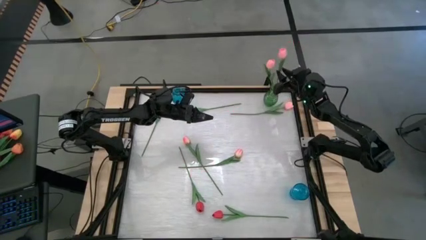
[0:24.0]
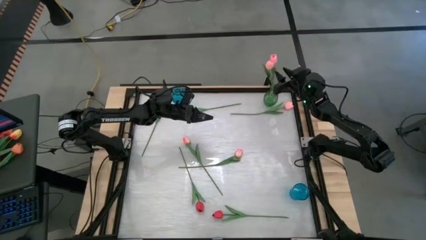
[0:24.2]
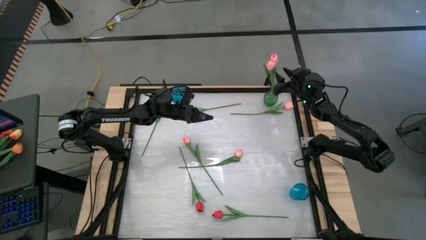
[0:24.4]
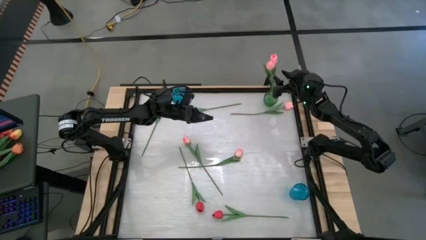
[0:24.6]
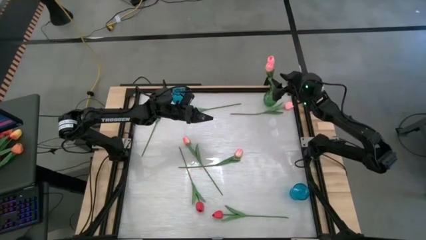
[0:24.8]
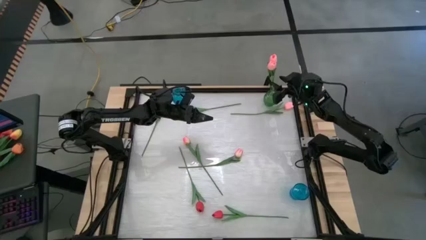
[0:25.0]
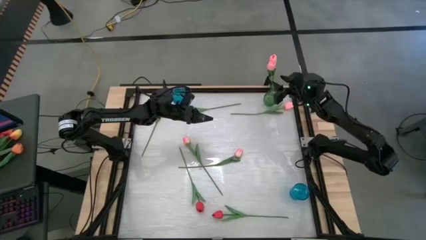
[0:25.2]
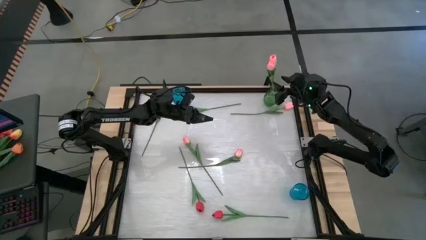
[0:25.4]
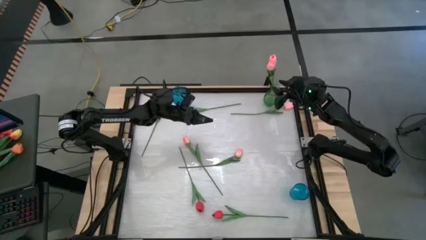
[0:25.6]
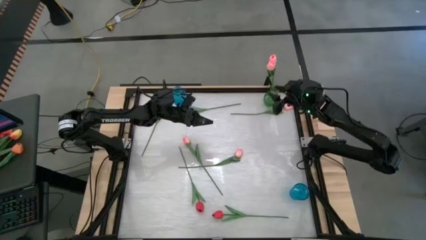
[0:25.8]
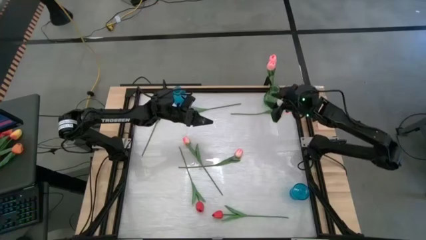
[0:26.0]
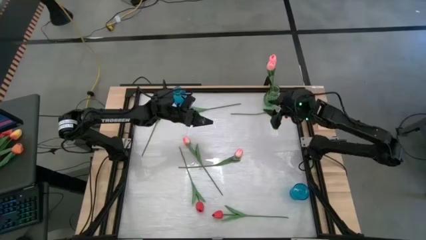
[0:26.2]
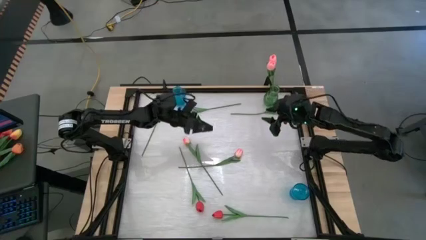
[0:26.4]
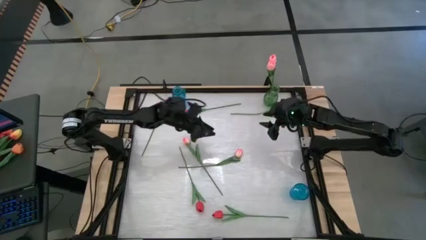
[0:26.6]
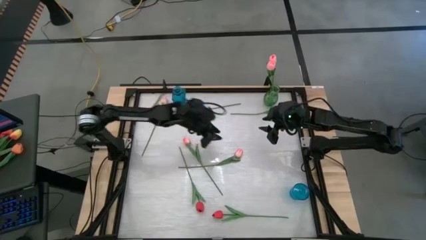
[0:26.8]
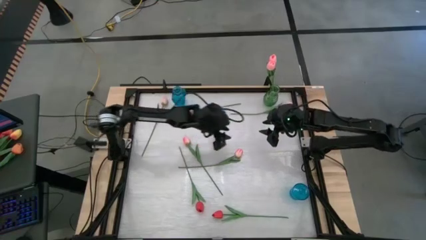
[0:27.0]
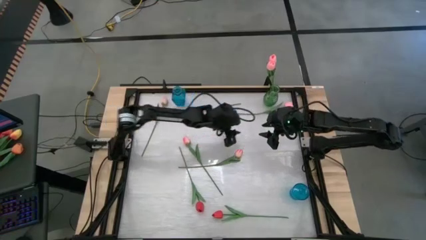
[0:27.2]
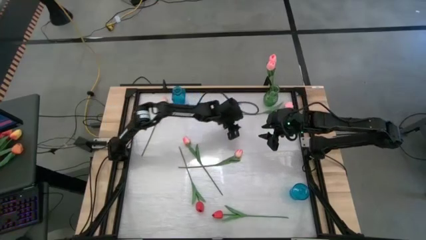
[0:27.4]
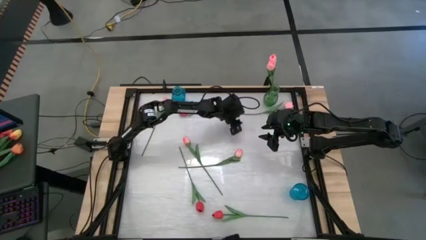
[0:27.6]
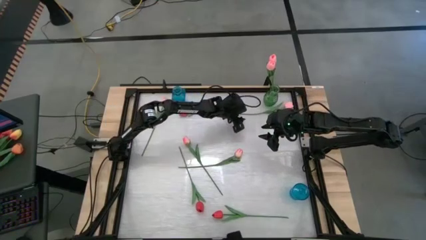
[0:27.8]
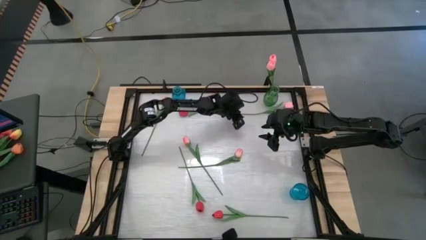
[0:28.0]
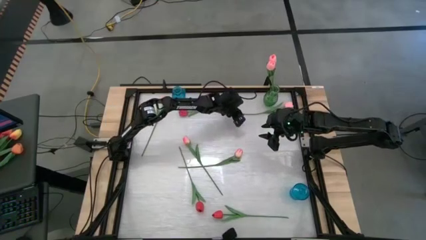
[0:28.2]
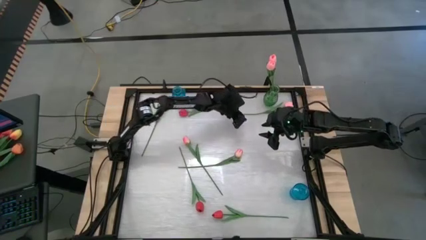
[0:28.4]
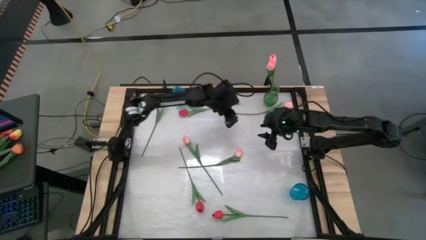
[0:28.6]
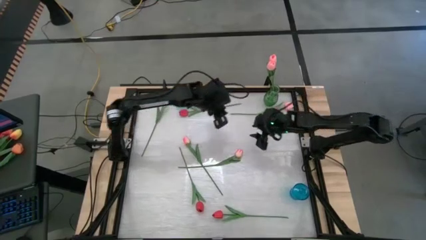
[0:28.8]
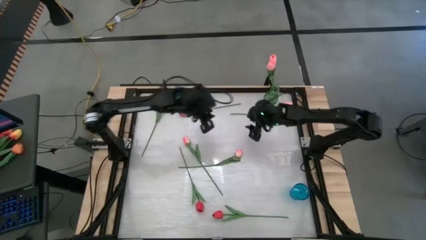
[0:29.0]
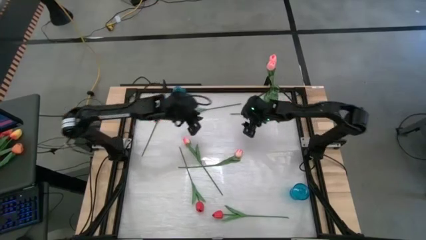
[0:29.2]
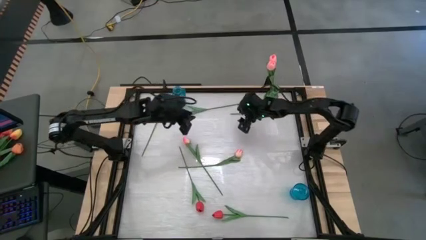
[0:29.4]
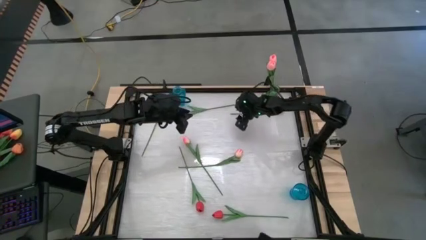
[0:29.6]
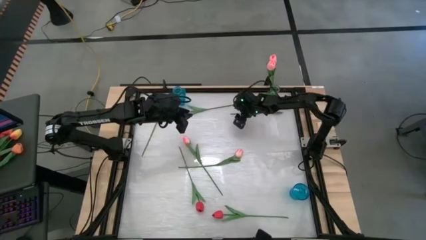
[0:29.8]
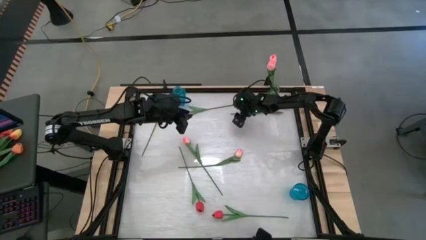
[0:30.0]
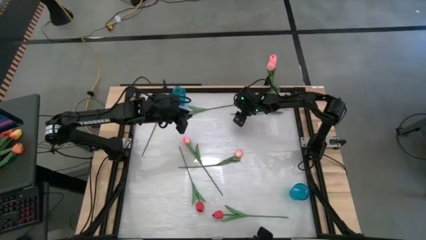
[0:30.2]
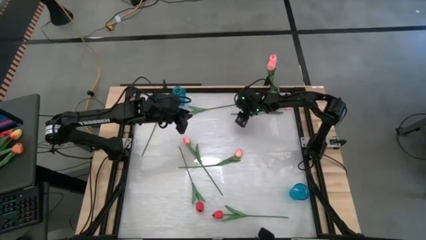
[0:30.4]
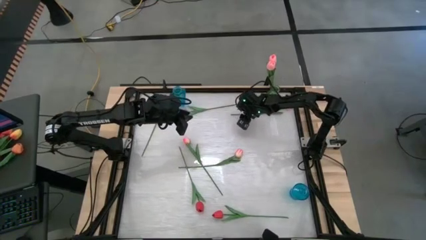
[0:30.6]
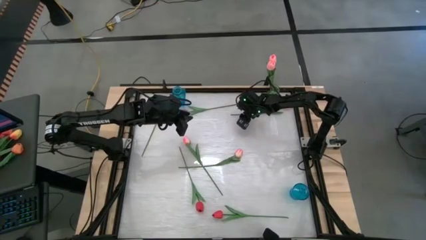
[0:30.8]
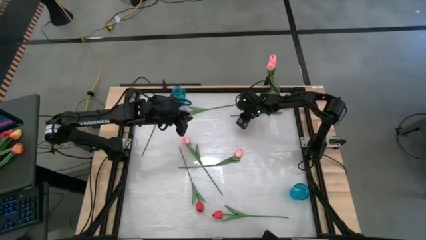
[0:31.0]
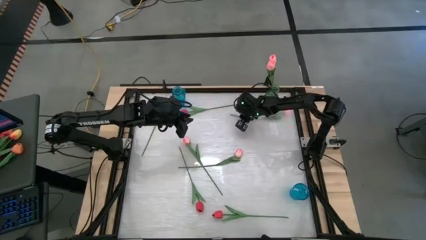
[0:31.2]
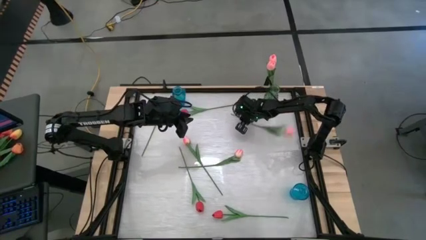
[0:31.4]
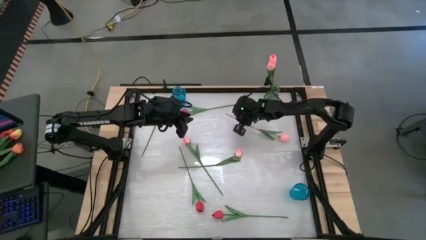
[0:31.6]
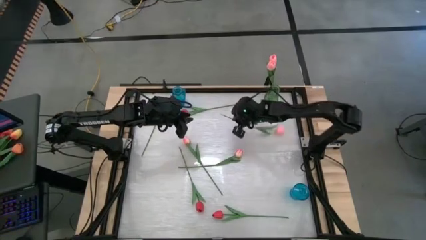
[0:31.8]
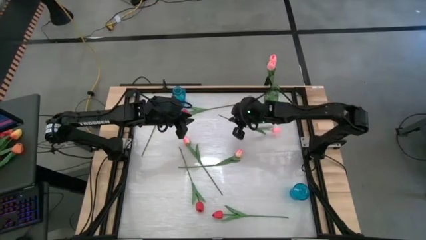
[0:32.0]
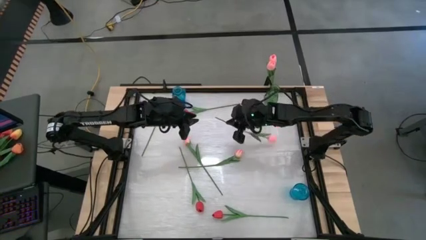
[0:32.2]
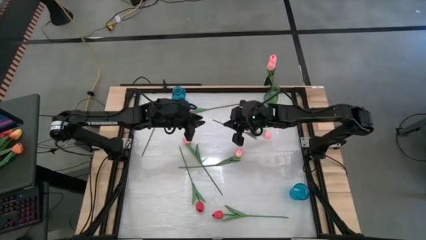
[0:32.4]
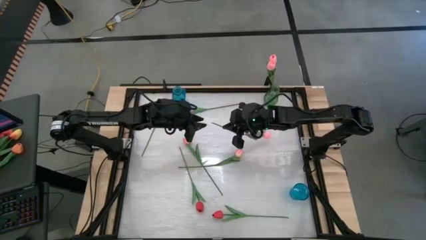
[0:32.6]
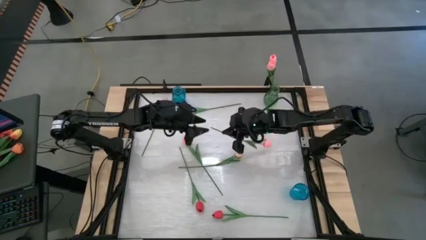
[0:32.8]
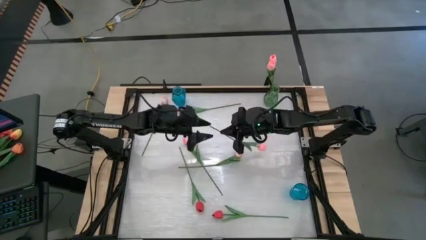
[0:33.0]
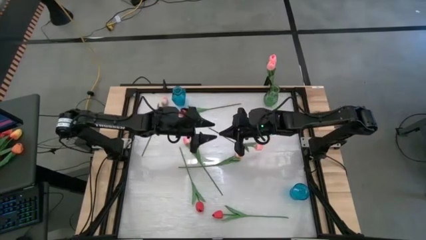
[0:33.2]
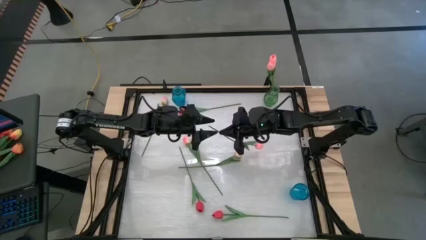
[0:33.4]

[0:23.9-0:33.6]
Task: Sort flowers into vase by color
Put the pink flower into the green vase

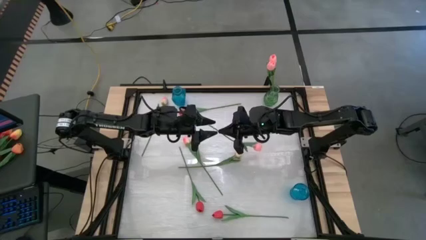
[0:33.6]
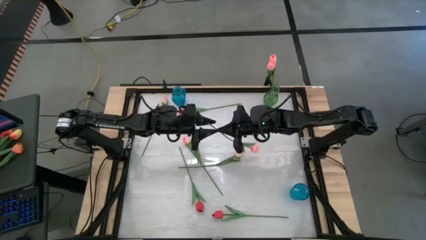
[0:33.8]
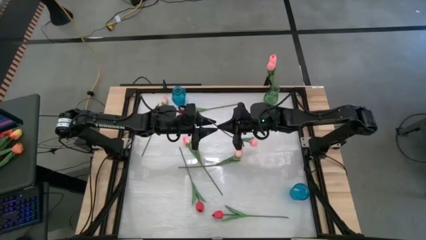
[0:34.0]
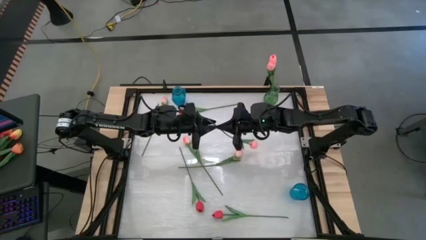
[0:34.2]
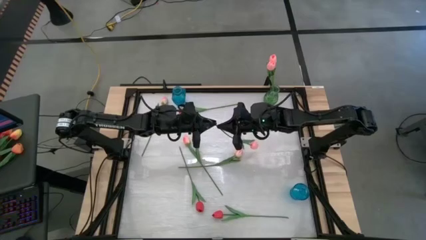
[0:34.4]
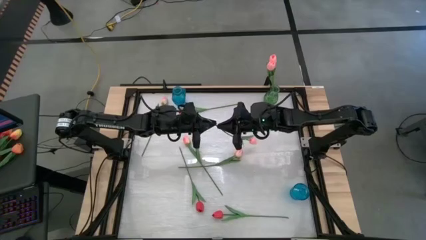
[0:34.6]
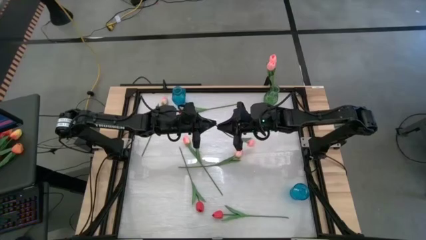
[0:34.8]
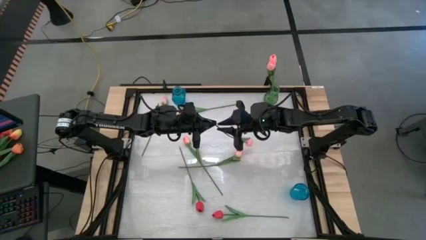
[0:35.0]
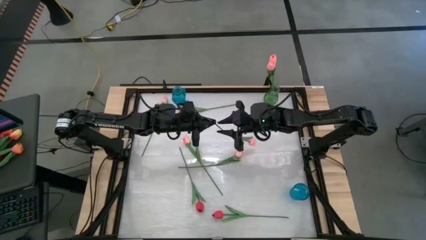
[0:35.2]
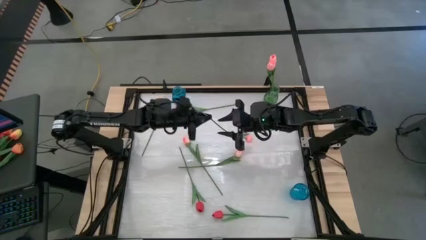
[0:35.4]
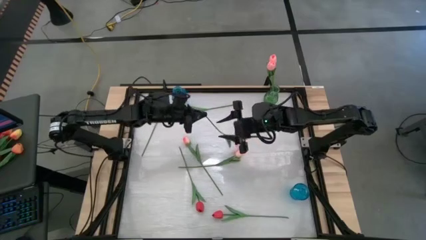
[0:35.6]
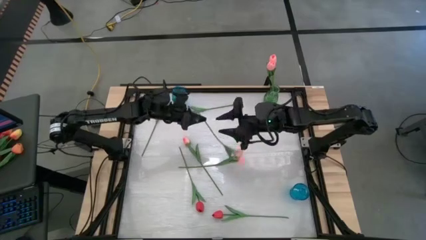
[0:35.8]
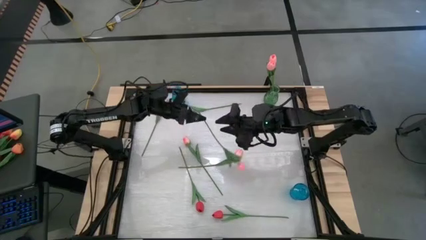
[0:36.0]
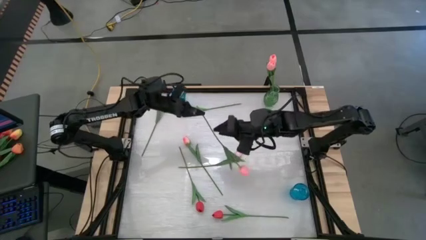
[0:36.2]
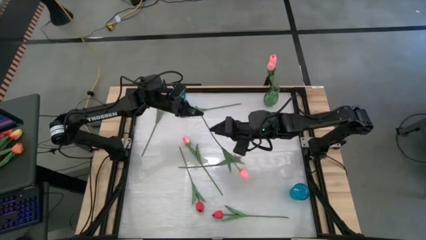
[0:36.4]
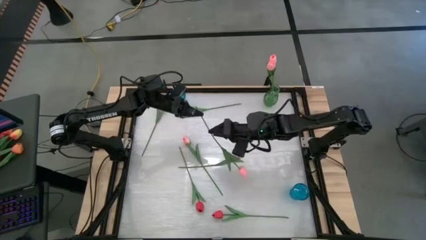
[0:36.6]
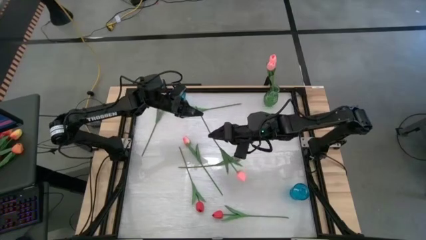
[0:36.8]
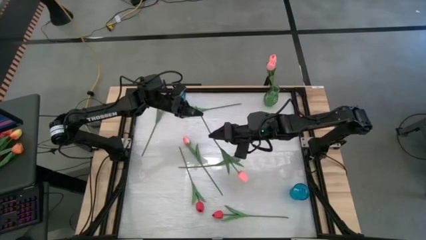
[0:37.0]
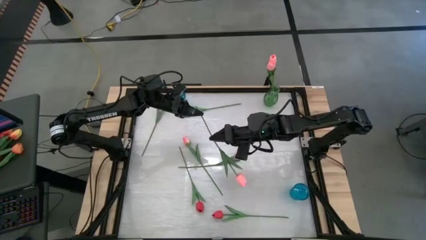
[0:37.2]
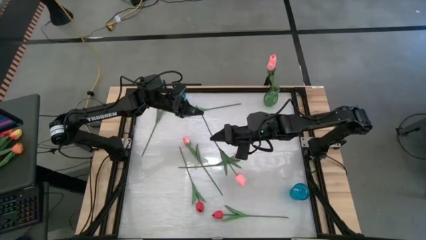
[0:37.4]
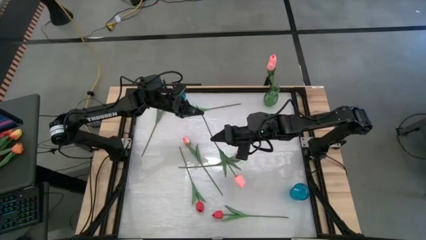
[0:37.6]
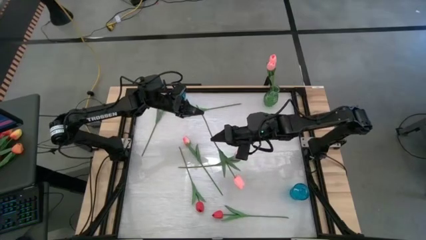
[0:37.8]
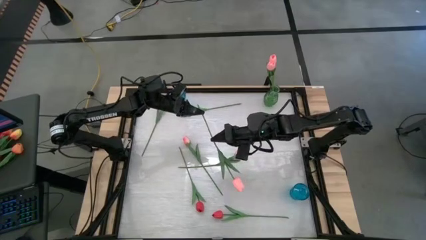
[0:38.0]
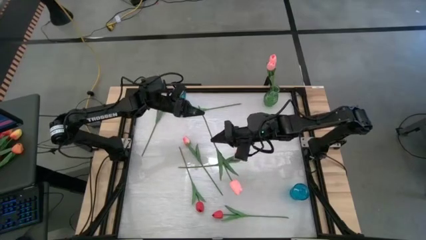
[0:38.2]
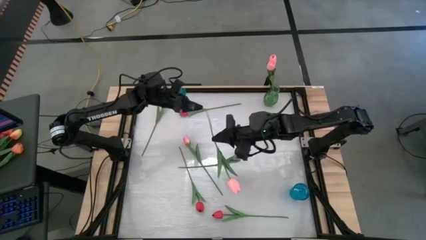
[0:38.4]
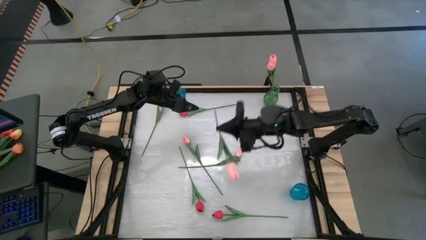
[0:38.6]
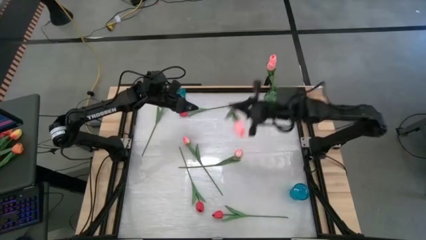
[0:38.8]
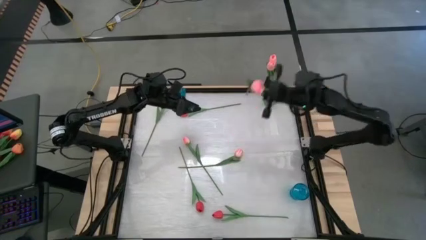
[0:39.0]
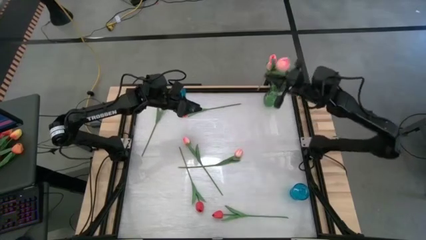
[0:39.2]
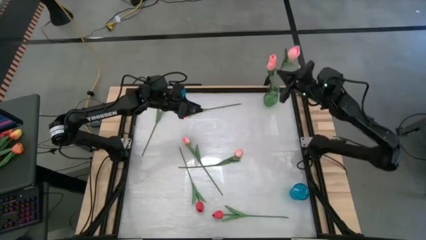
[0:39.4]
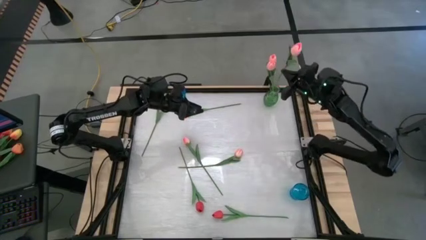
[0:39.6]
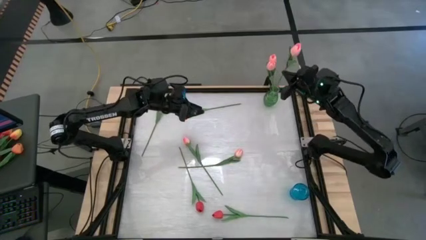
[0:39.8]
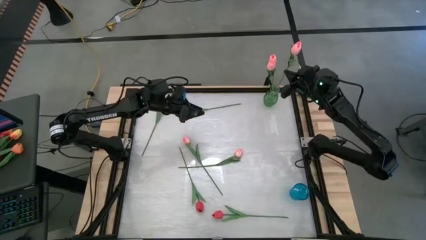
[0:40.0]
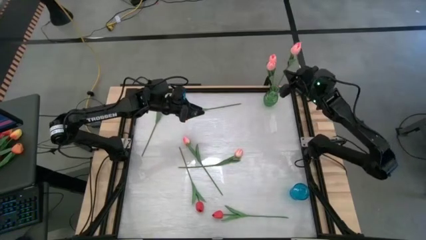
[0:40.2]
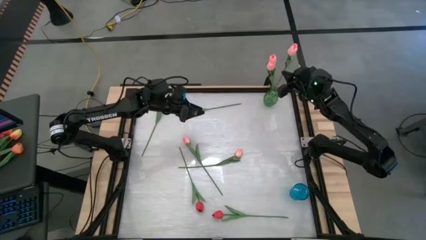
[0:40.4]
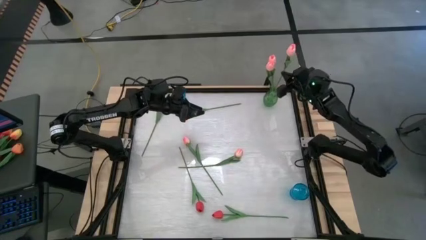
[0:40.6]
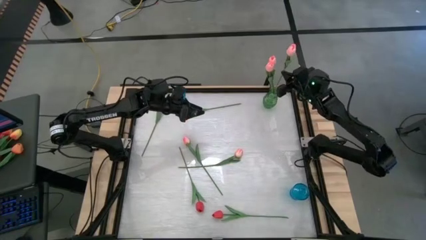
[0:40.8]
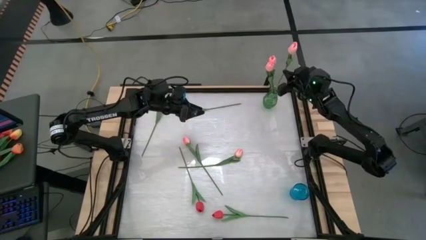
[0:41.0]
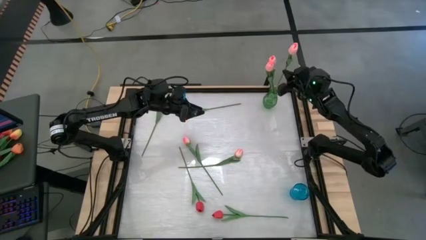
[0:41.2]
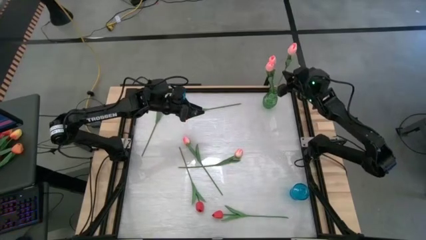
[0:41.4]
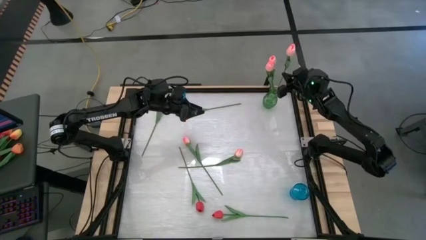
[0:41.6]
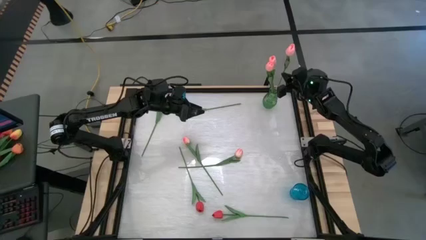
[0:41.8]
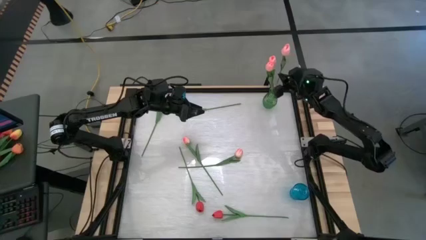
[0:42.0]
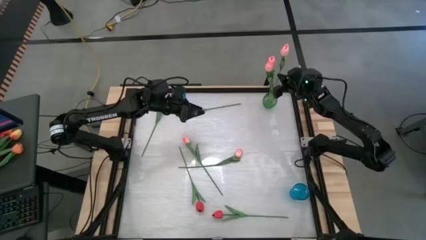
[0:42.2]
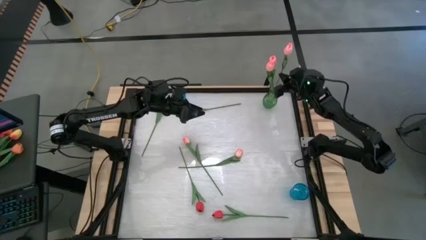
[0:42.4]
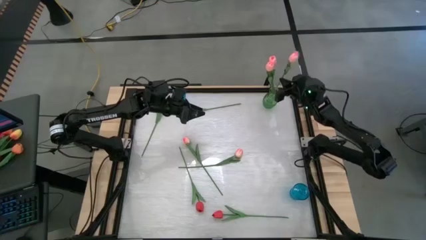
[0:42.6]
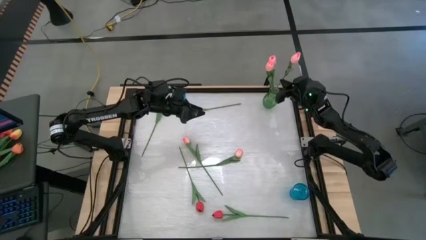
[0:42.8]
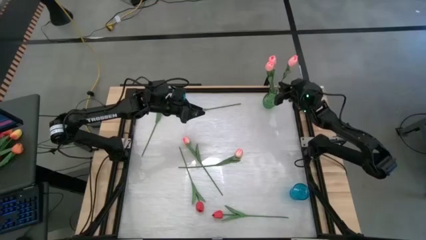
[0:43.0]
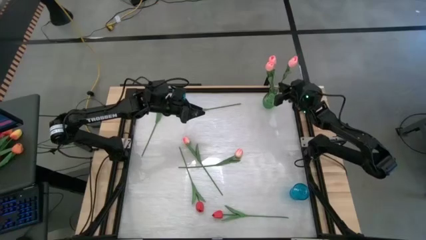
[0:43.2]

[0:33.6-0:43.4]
Put the pink flower into the green vase
